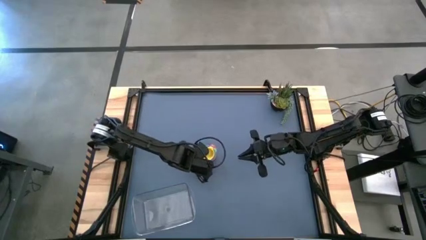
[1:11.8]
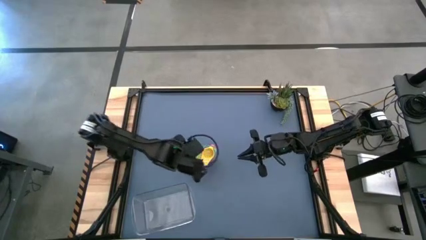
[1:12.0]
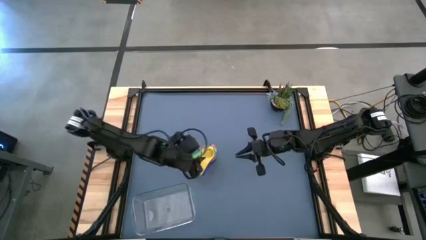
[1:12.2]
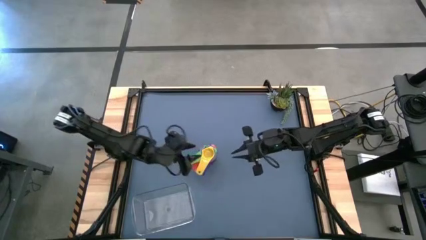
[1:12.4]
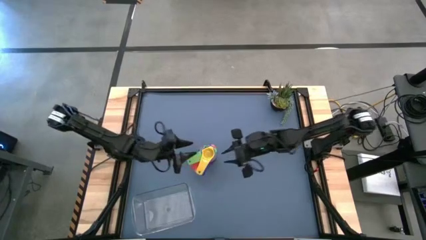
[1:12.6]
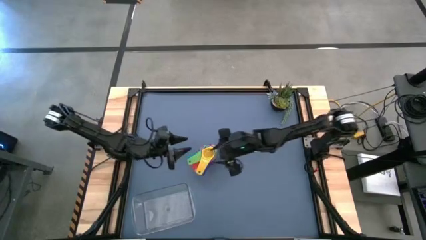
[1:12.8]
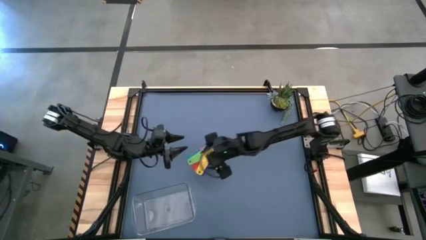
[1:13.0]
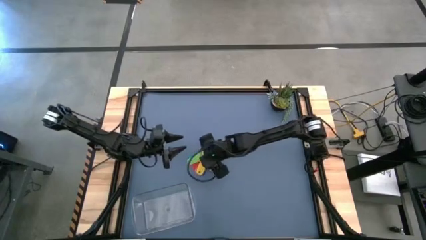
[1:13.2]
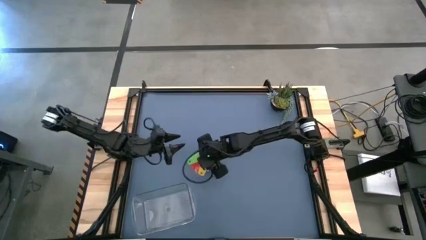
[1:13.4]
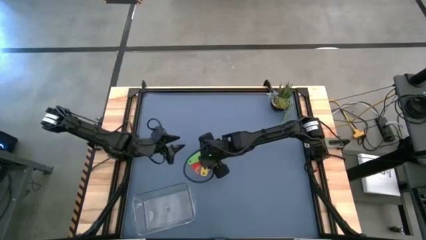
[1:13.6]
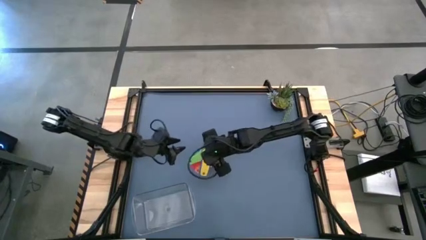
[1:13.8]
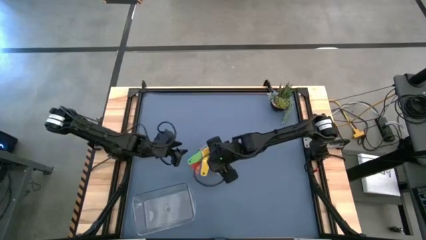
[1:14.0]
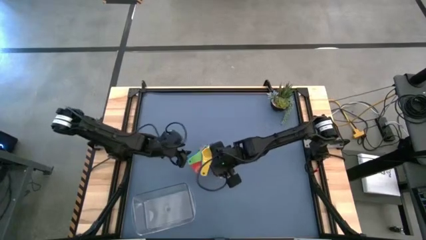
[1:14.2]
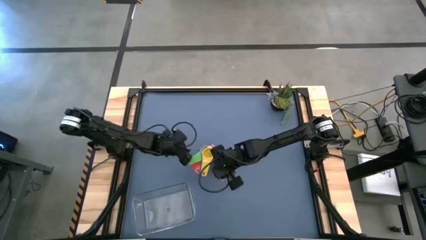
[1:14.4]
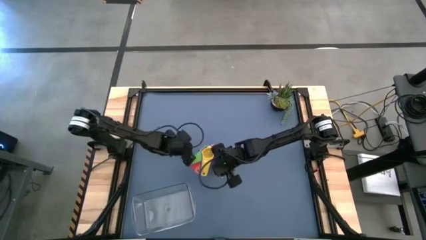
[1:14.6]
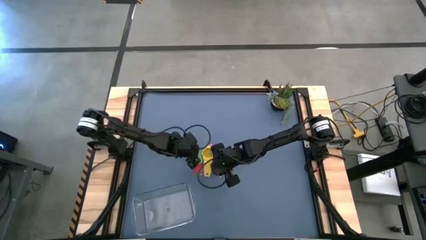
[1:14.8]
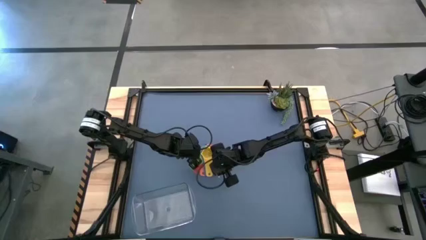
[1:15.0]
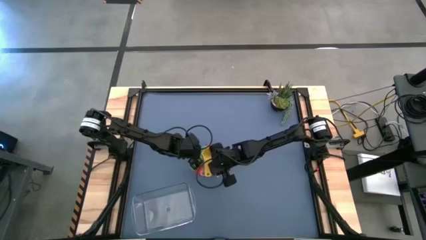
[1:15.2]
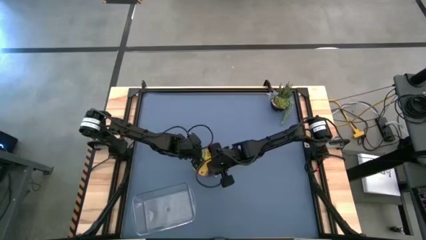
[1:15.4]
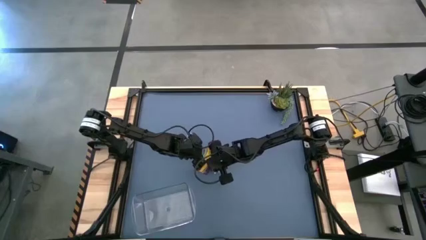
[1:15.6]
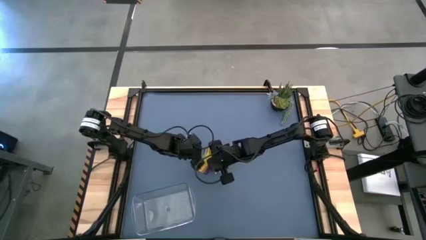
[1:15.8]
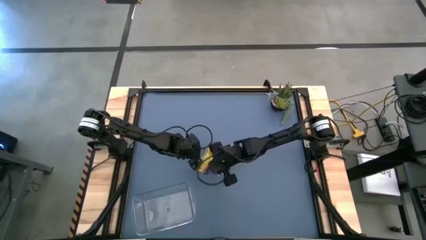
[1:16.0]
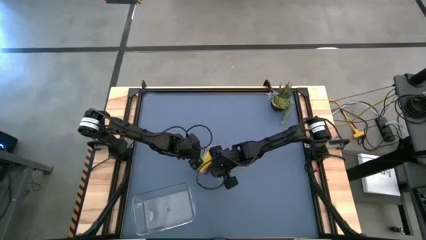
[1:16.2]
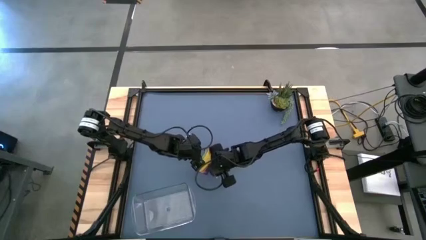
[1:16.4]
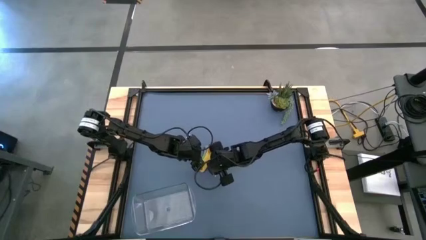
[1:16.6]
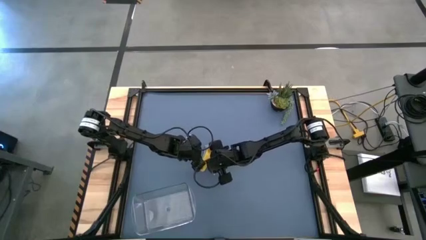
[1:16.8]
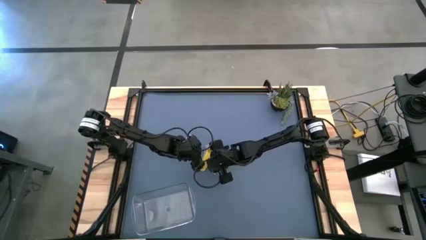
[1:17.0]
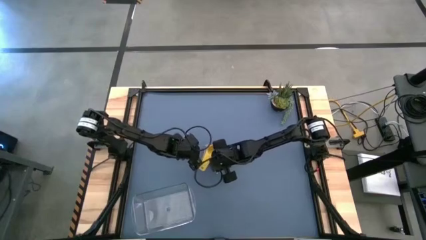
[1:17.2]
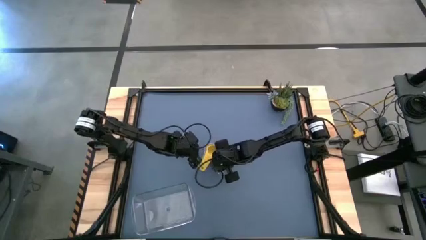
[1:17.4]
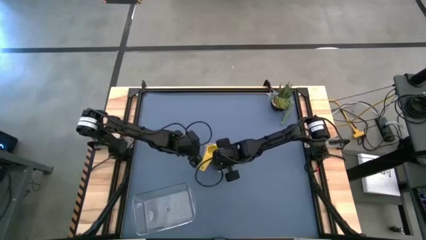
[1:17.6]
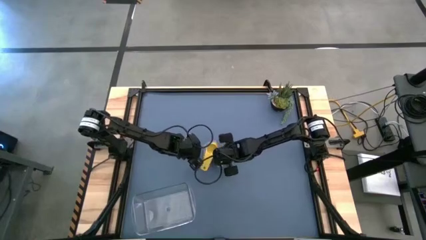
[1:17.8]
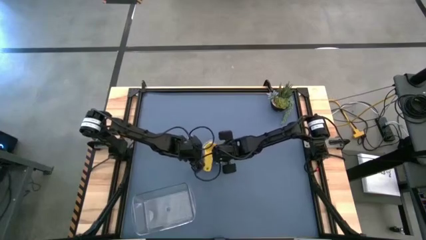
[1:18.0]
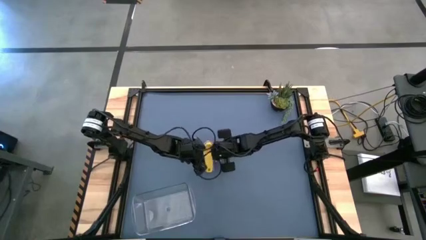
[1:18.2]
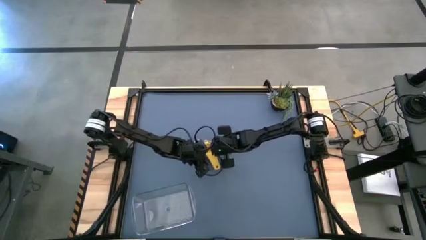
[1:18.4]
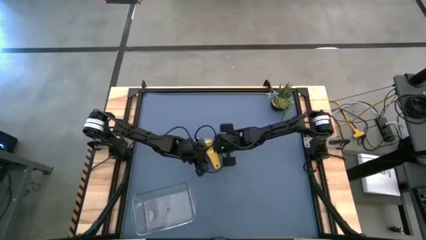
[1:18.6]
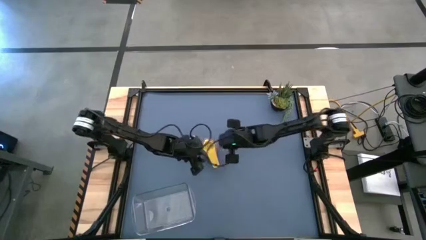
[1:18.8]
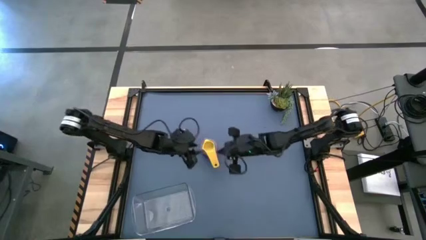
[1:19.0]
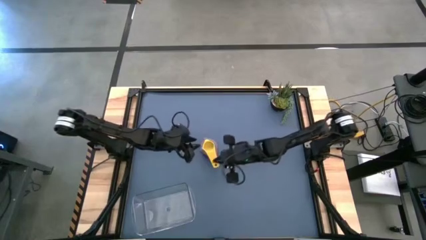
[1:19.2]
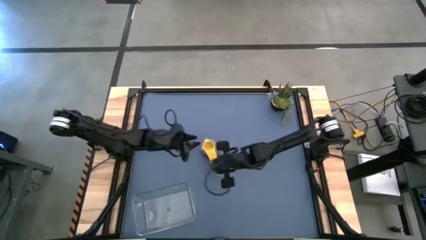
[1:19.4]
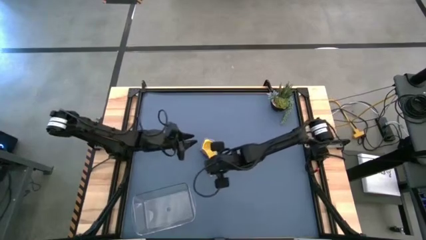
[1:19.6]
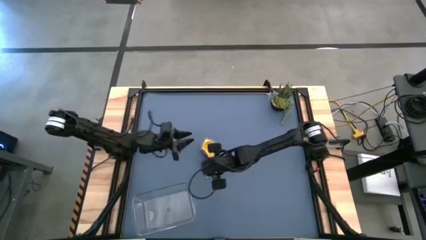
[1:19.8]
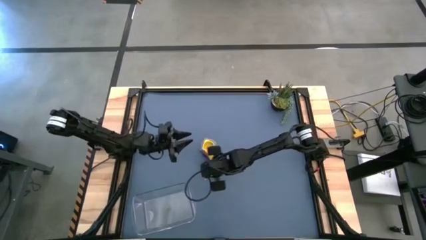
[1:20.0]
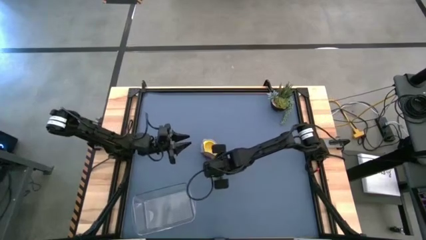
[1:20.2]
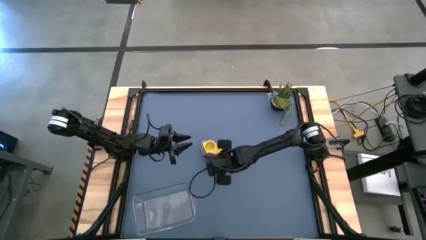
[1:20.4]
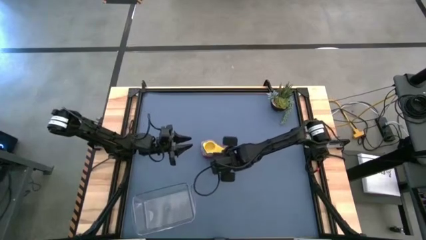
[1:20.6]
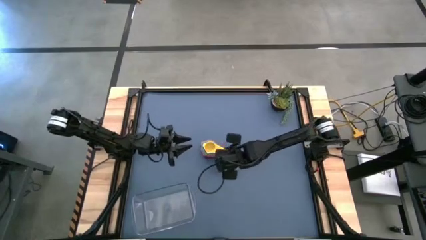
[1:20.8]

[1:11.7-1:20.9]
Task: Nest measuring cups in basket
Adjust the measuring cups

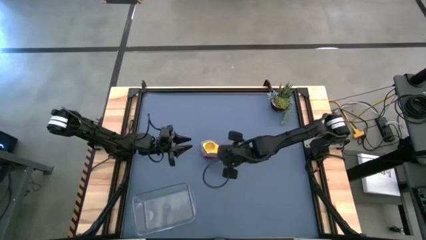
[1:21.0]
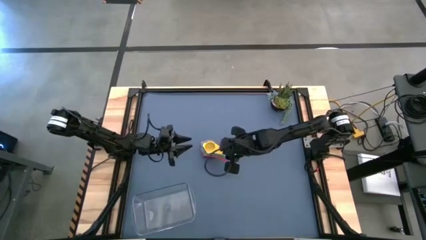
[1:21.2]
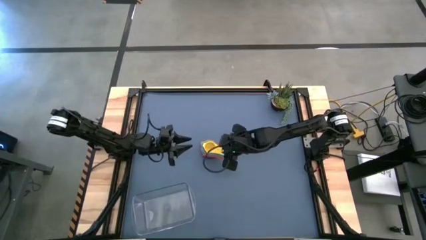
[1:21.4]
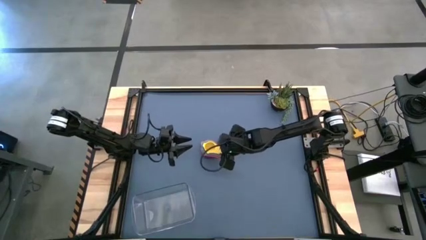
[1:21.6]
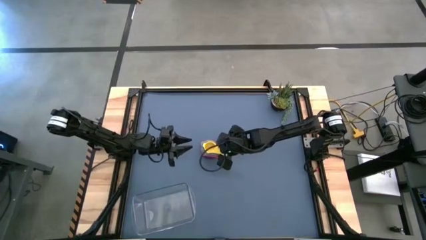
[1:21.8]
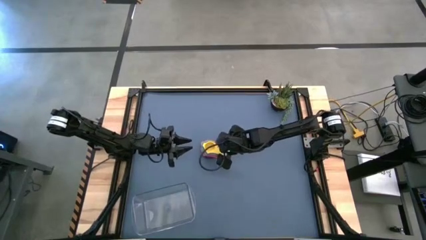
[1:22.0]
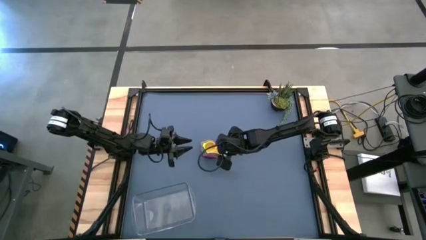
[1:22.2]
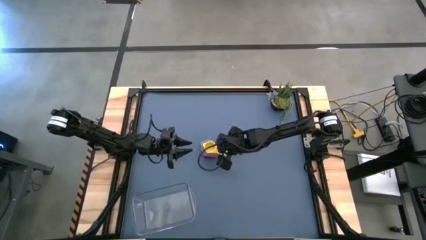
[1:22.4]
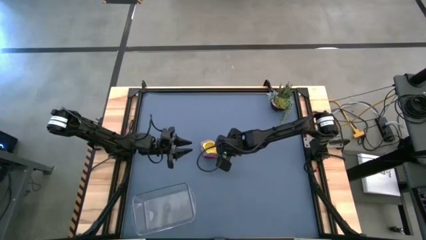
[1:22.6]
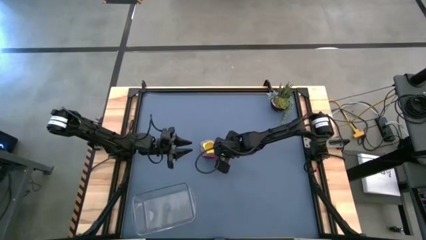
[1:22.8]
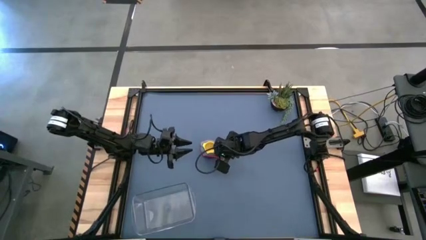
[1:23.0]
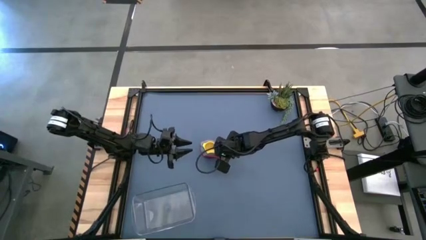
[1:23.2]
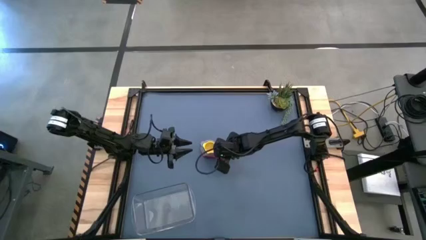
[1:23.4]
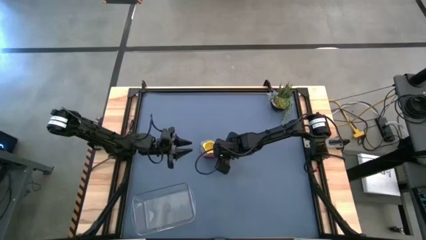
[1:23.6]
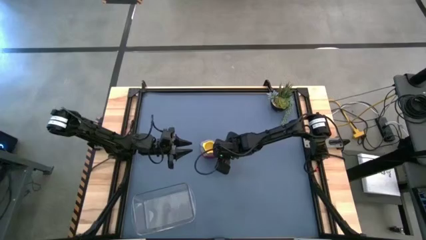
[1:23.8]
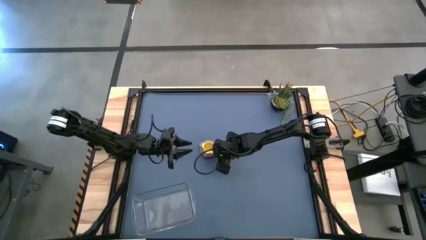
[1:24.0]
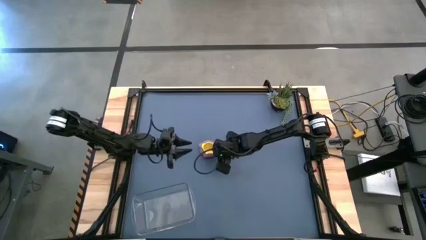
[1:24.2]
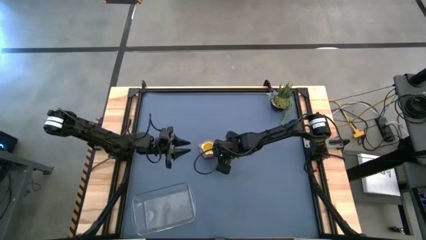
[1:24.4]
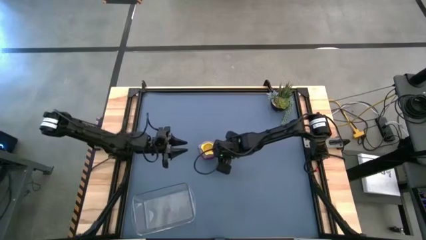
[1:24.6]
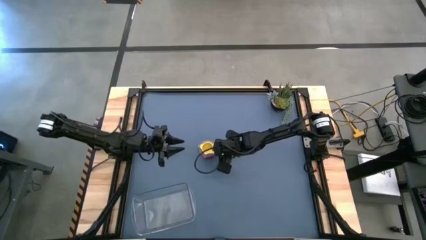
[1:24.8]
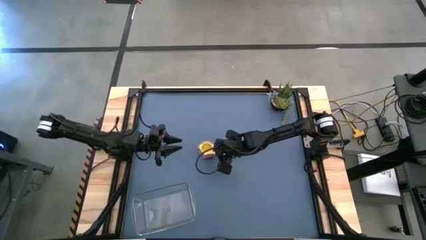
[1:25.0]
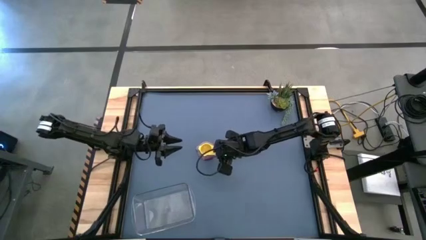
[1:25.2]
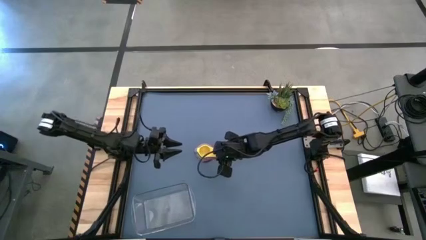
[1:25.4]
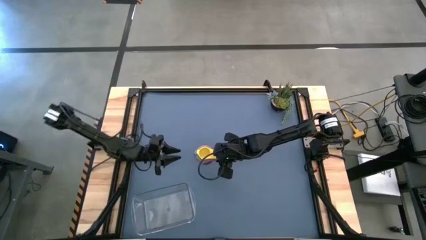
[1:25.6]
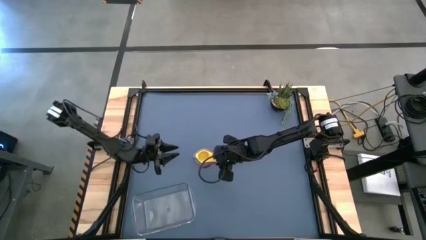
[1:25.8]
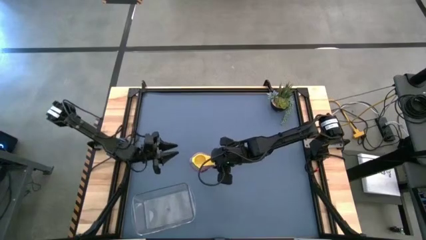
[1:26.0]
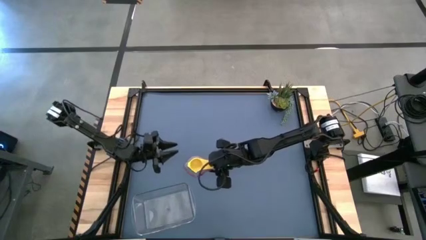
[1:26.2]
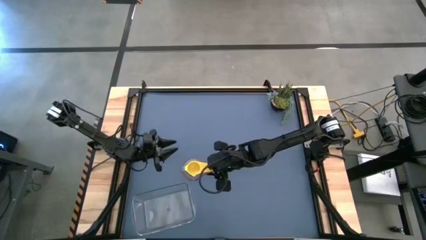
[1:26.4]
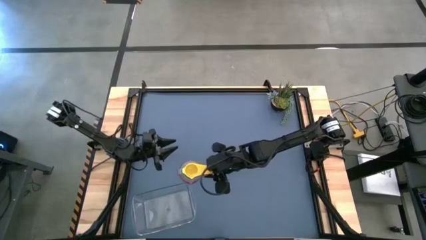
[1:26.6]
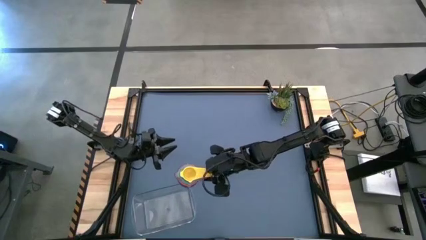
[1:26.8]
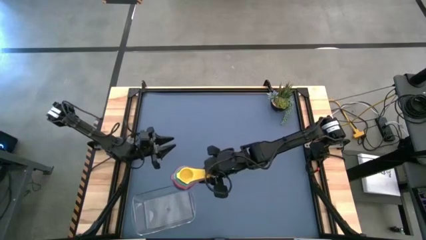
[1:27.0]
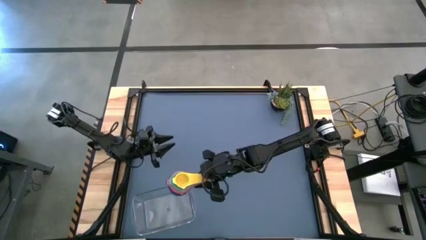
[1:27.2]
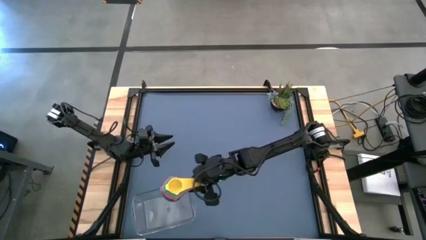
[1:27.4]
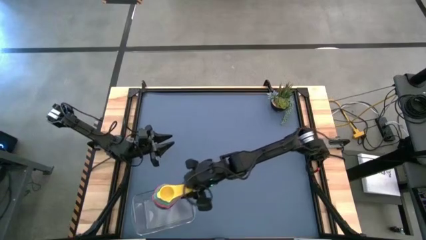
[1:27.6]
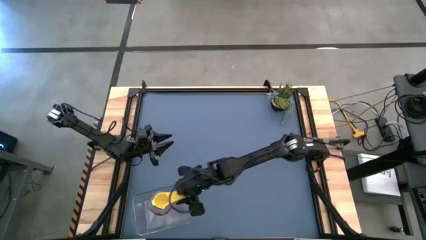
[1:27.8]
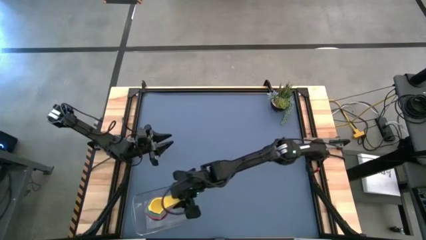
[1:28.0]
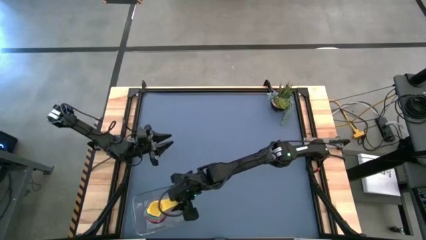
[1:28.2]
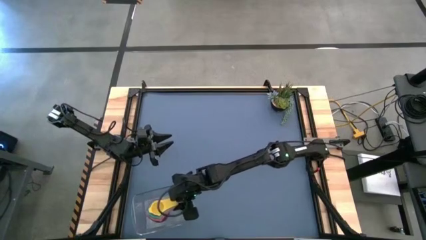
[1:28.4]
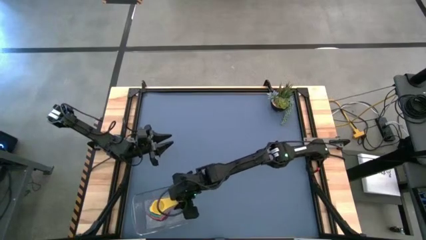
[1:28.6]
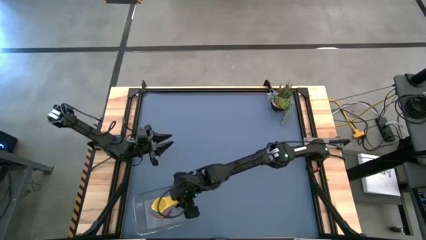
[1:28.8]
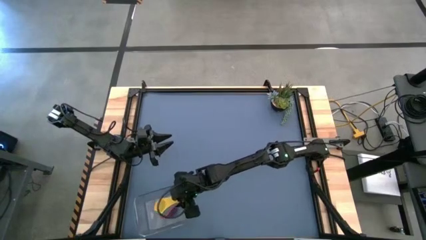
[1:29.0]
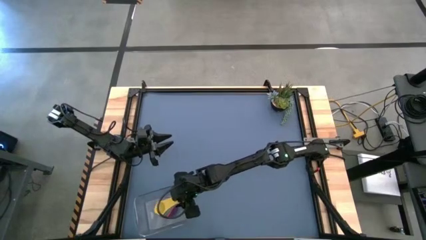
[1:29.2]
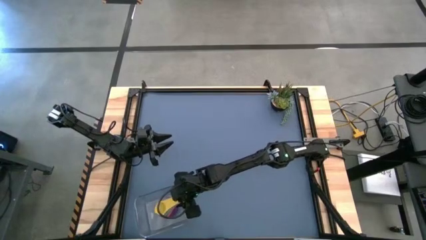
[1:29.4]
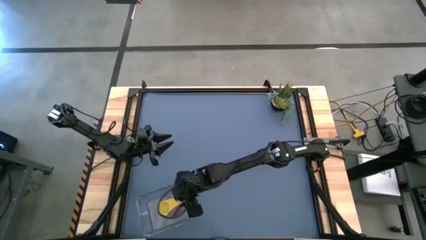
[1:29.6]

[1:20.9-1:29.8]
Put the nested measuring cups into the transparent bin
